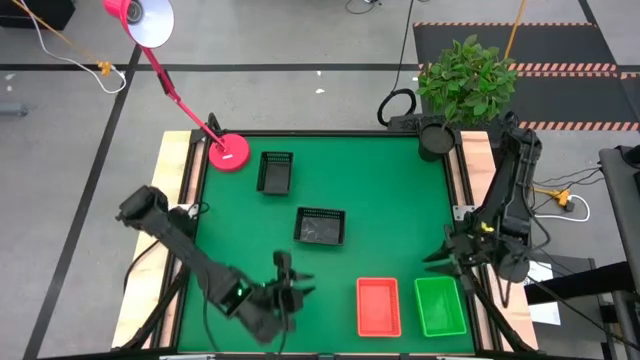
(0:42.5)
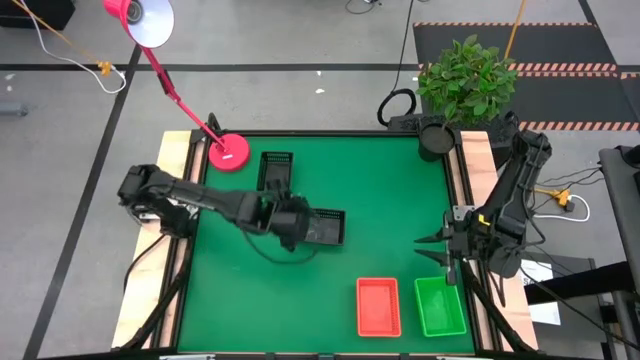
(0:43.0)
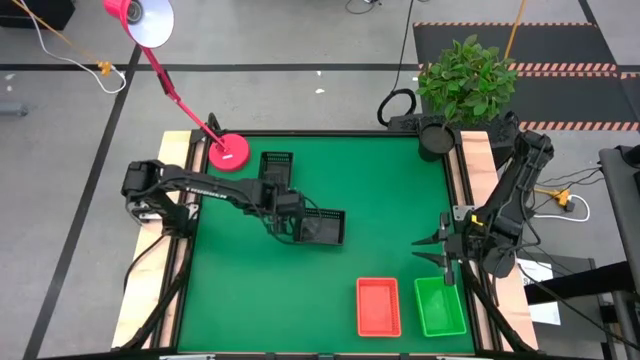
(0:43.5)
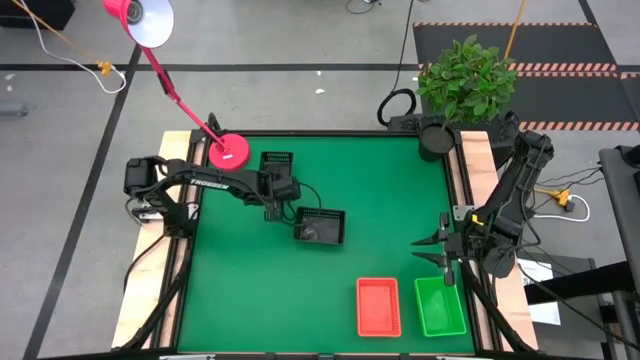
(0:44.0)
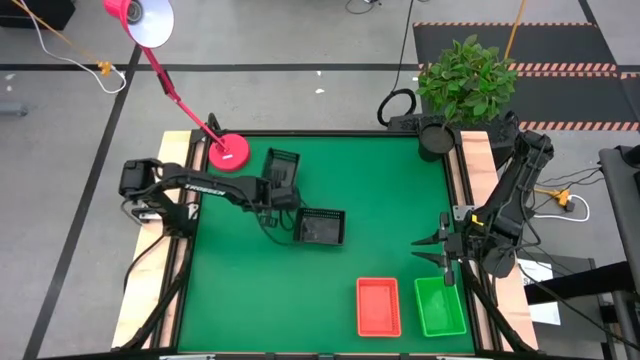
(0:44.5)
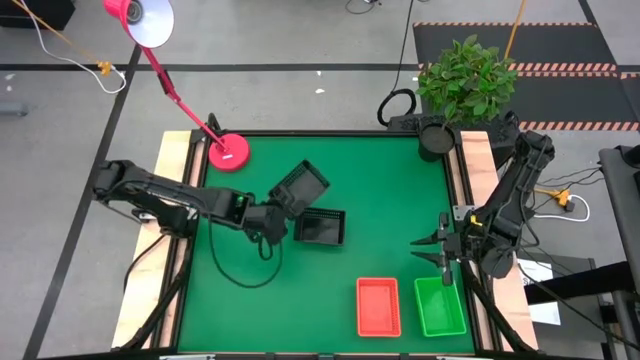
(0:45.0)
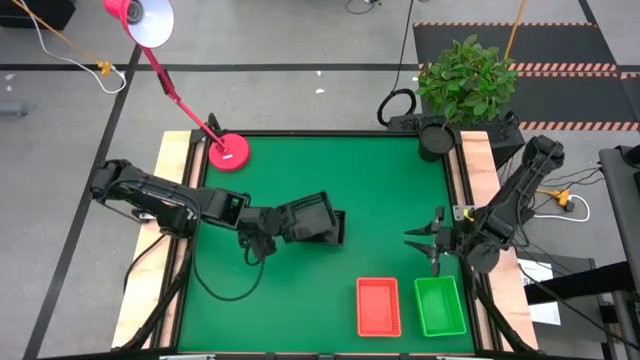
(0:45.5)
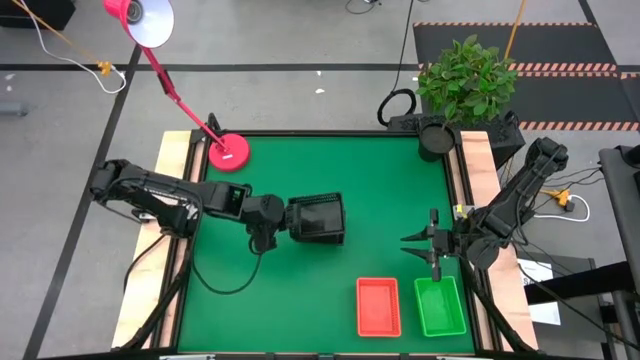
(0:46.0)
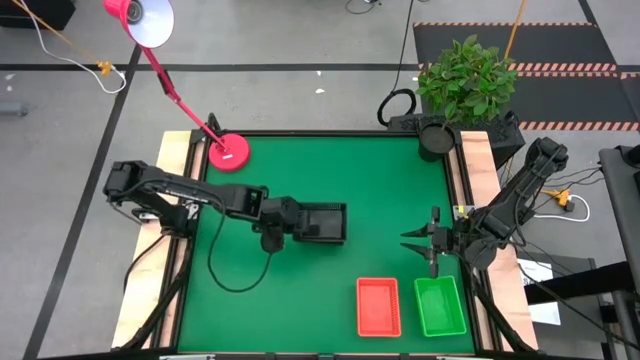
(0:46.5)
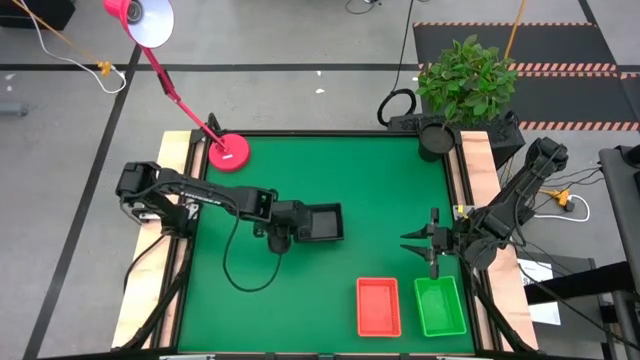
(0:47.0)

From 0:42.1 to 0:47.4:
Stack the top black bin on top of the bottom stacked black bins

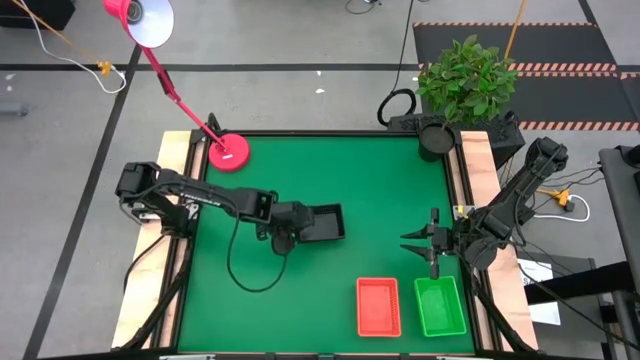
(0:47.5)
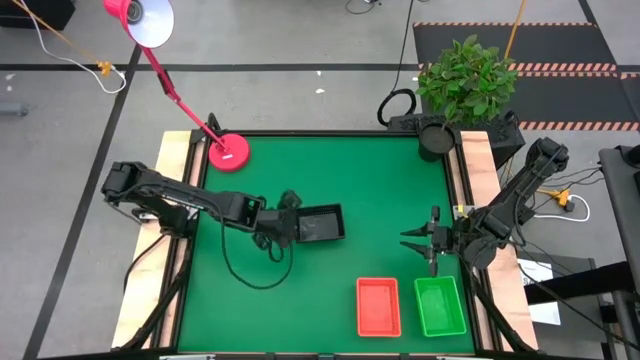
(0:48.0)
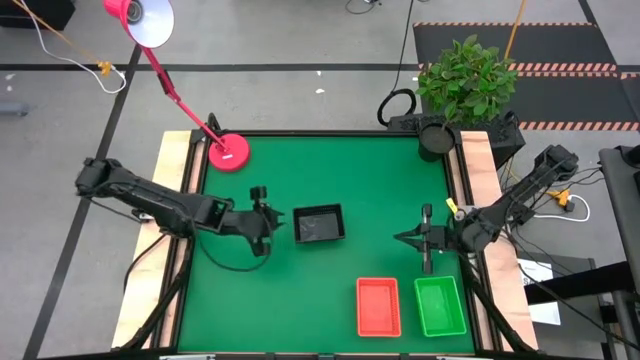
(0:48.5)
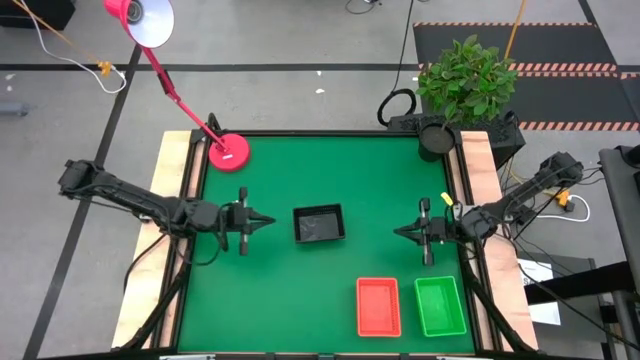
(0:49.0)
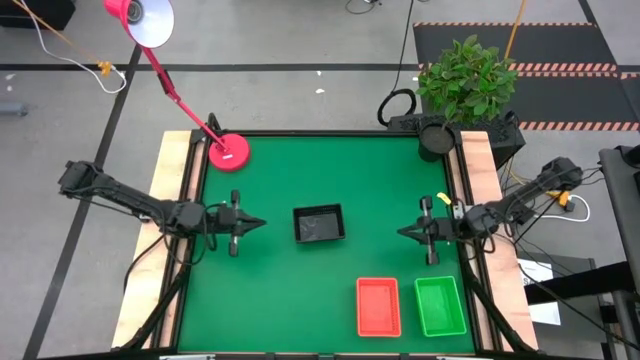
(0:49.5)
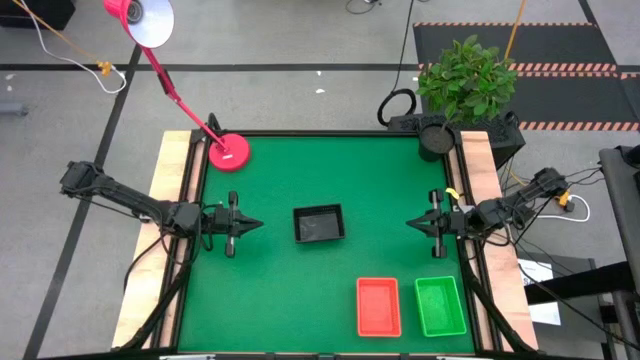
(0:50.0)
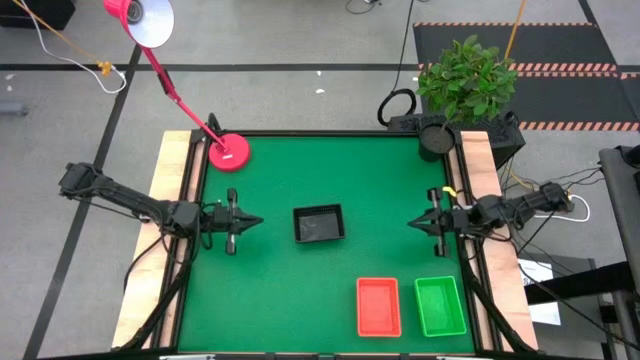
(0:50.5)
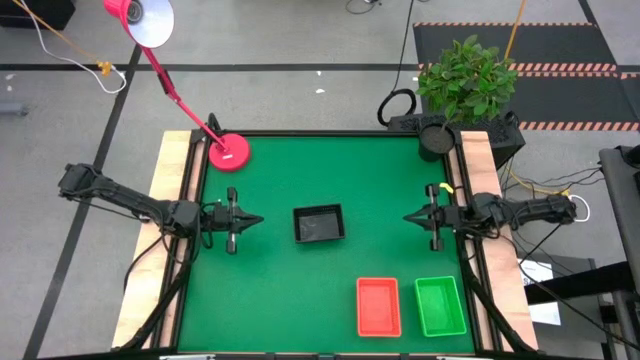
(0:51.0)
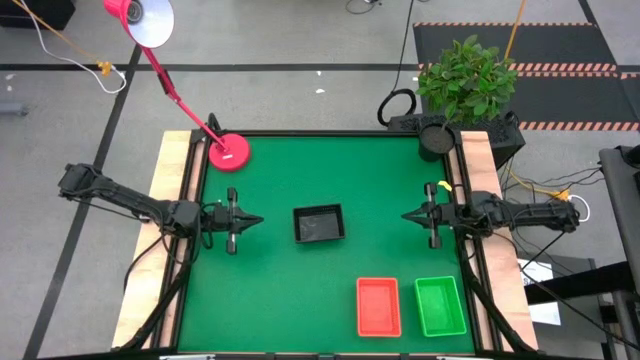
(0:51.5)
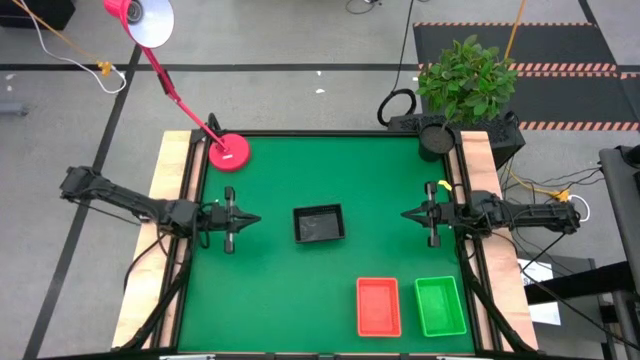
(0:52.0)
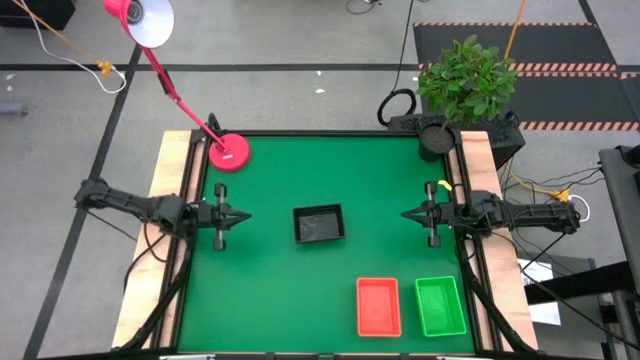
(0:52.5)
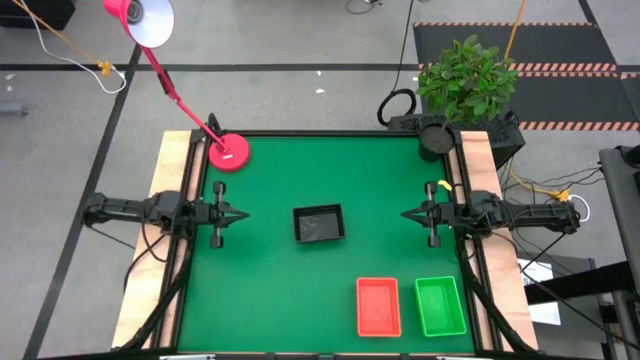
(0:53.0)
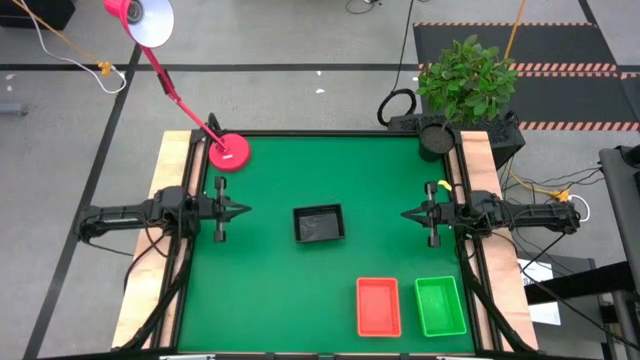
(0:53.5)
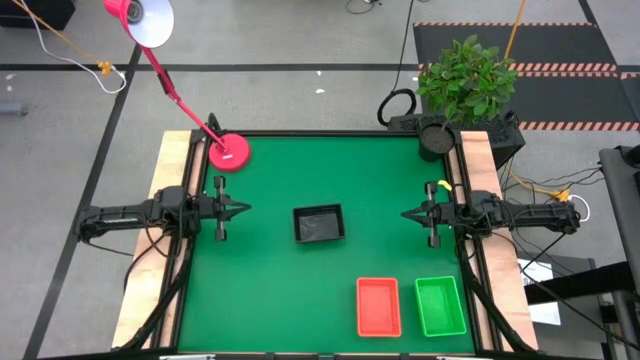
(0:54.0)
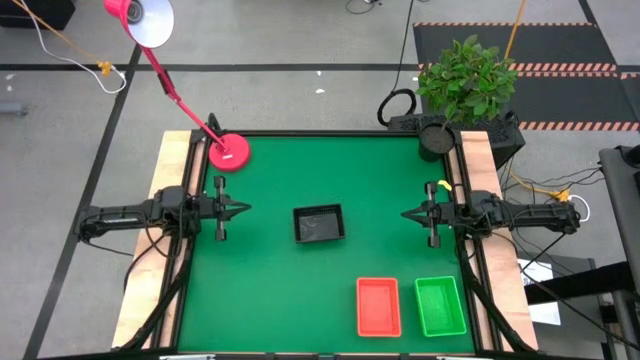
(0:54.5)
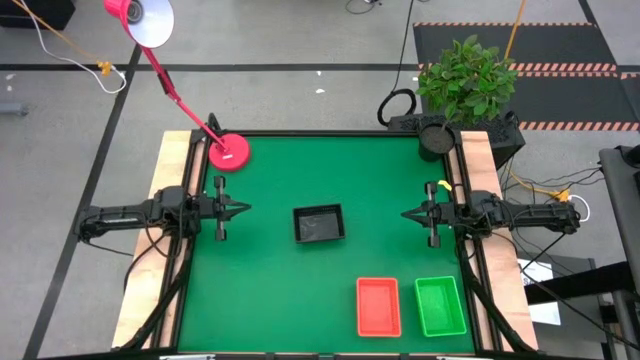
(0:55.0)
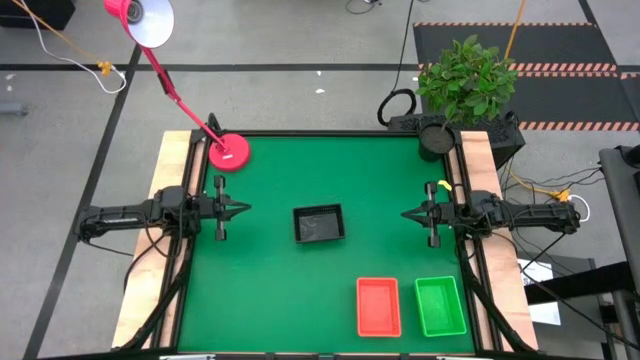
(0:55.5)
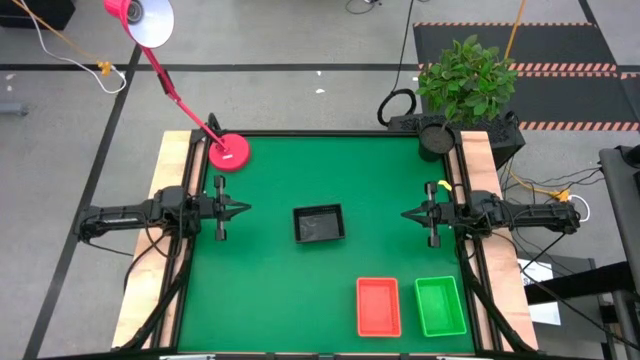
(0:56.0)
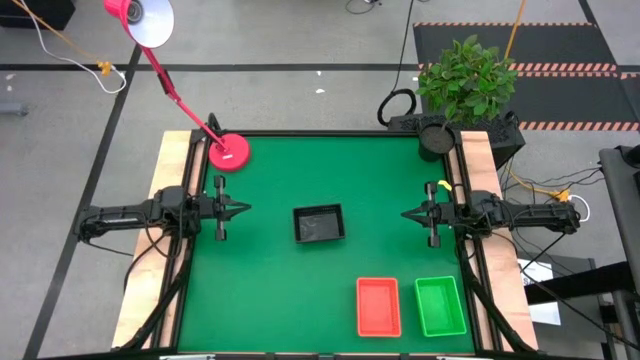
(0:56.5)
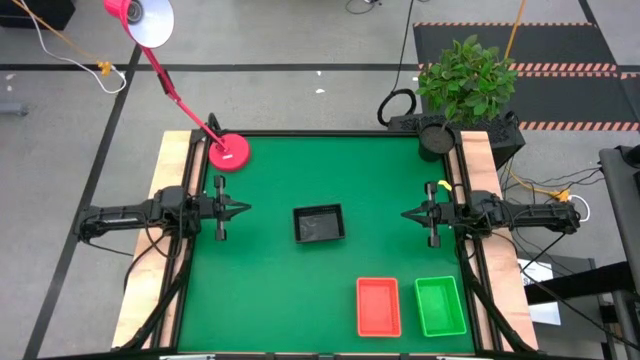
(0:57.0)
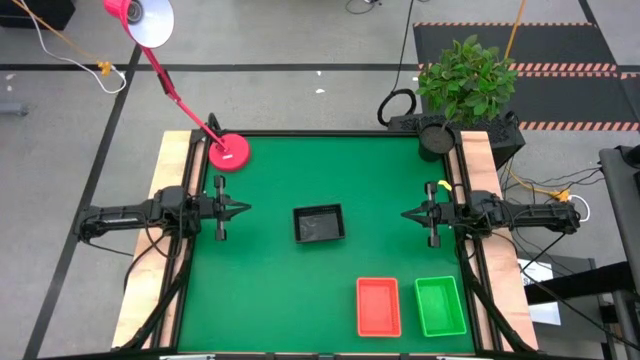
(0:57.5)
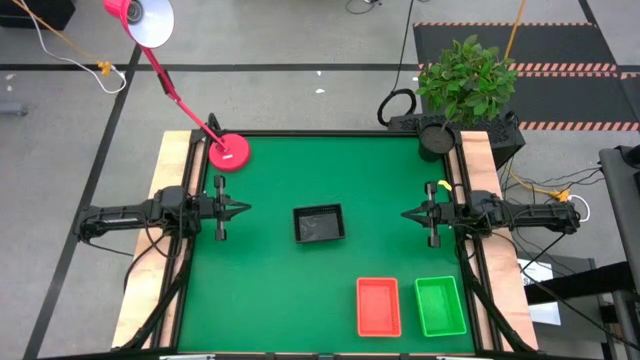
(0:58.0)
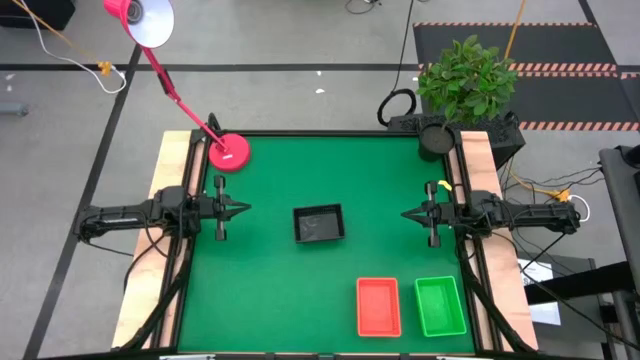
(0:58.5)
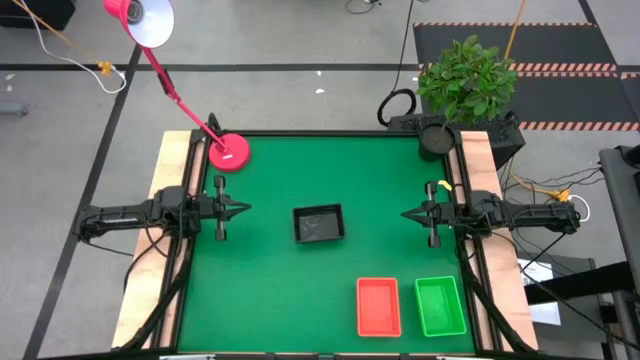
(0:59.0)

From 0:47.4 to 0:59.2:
Return to Home Position
